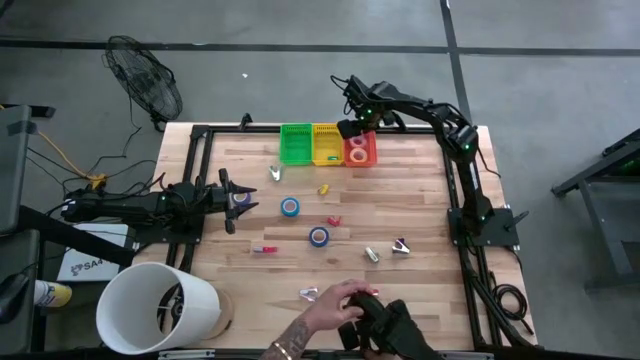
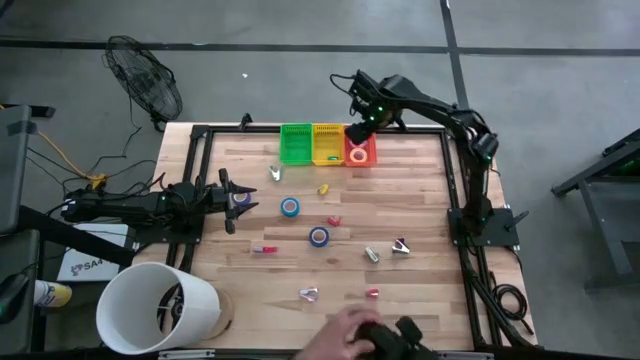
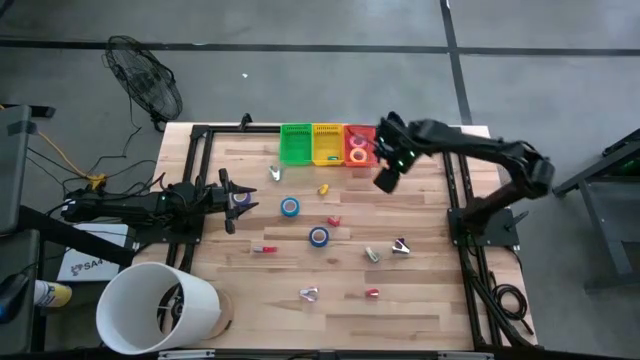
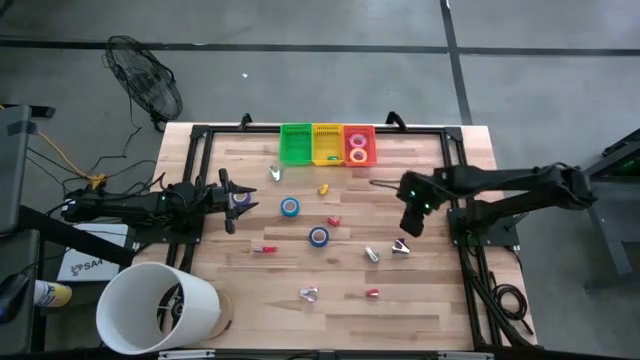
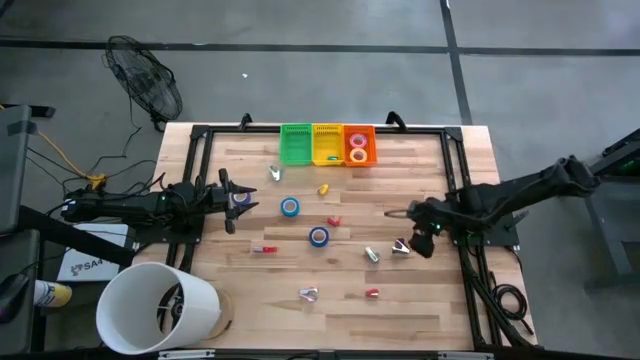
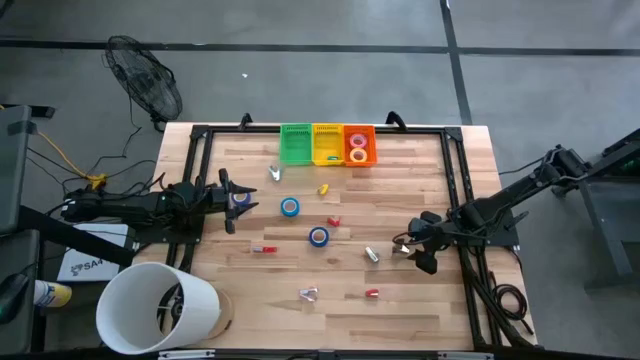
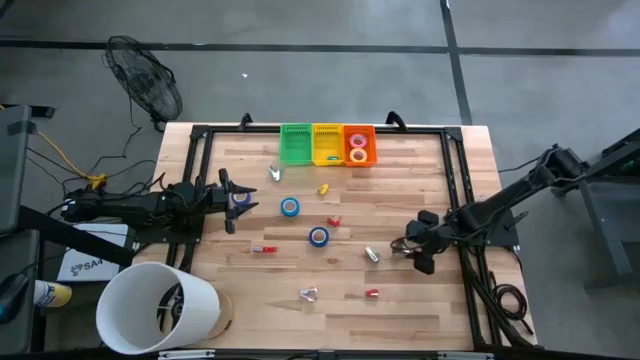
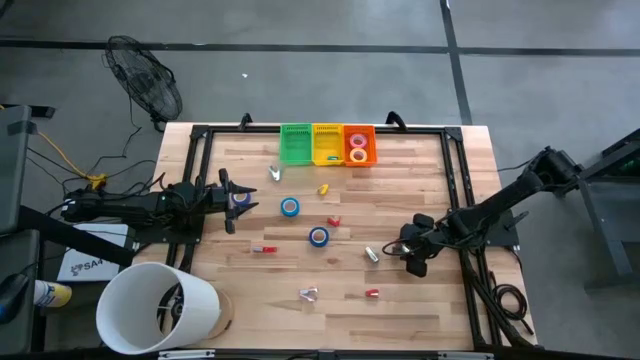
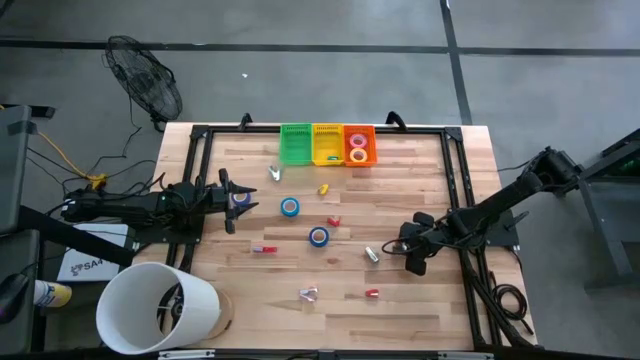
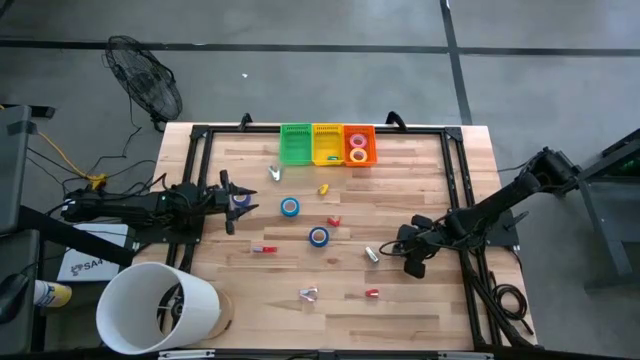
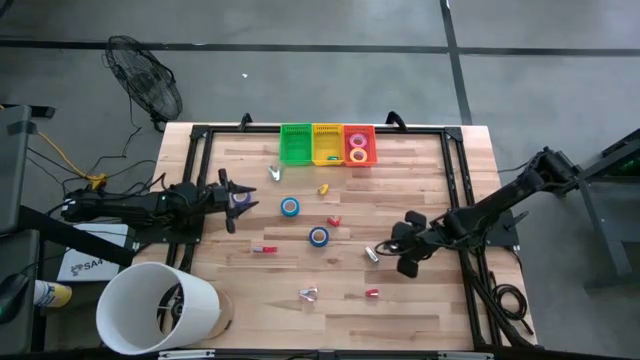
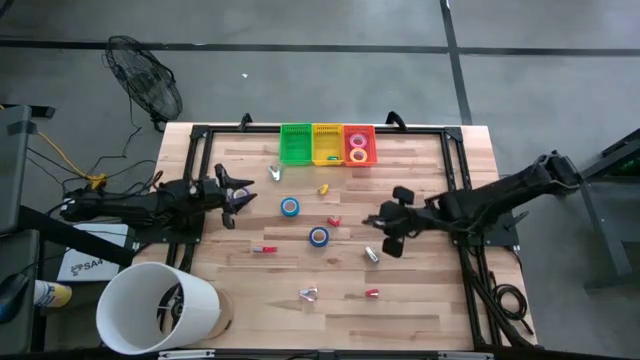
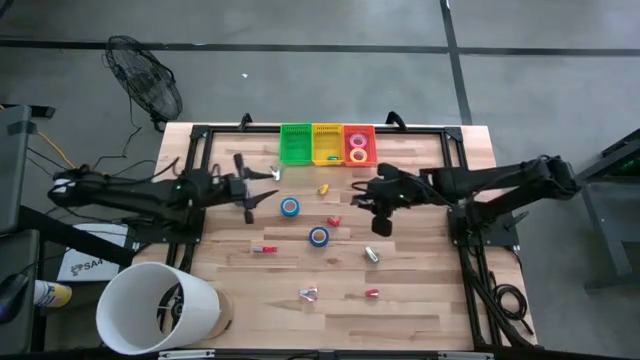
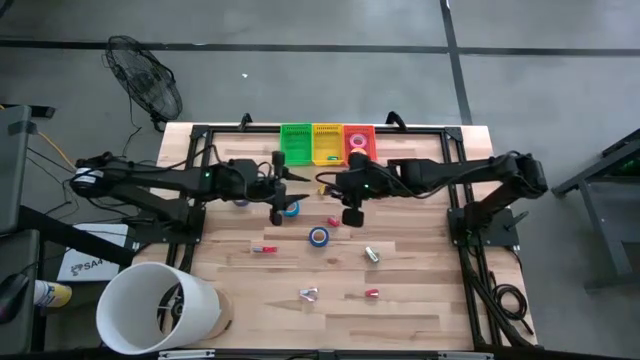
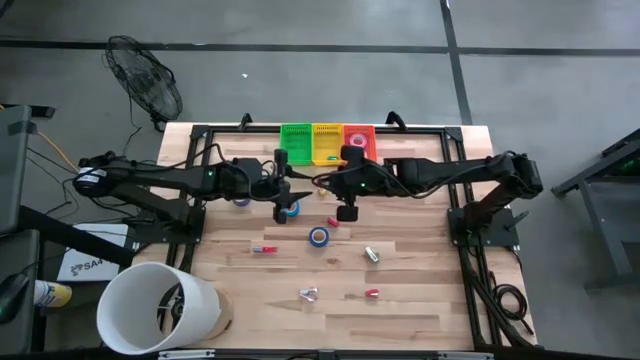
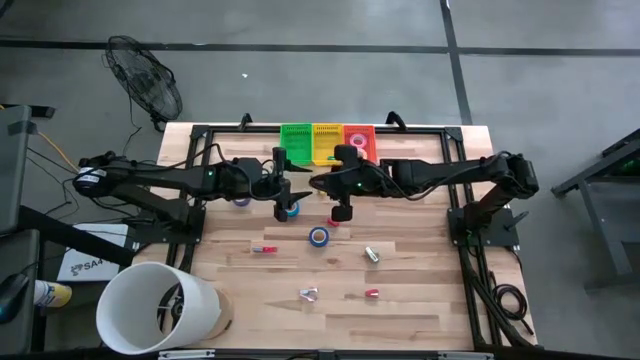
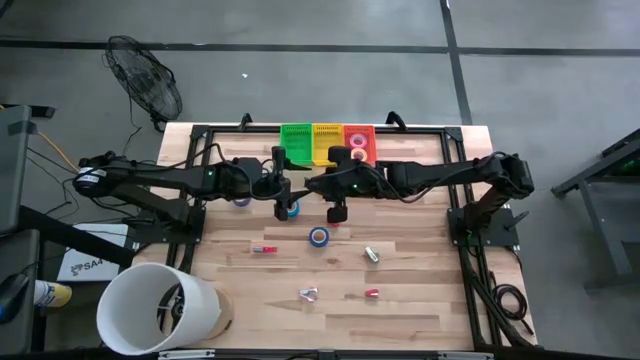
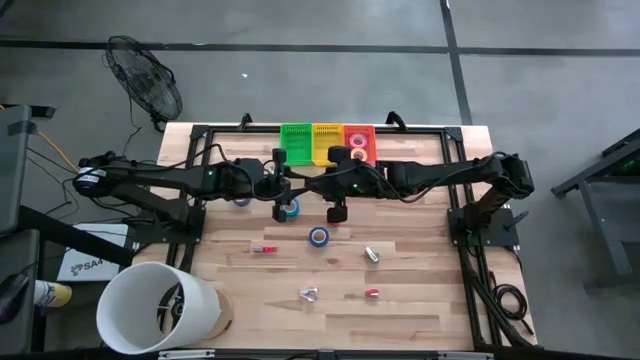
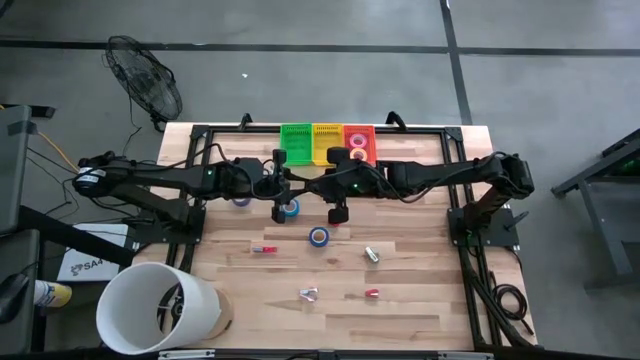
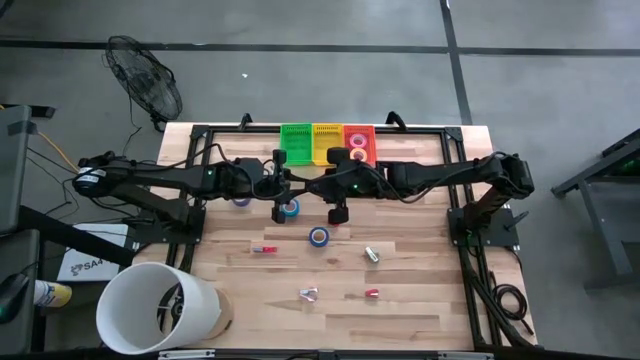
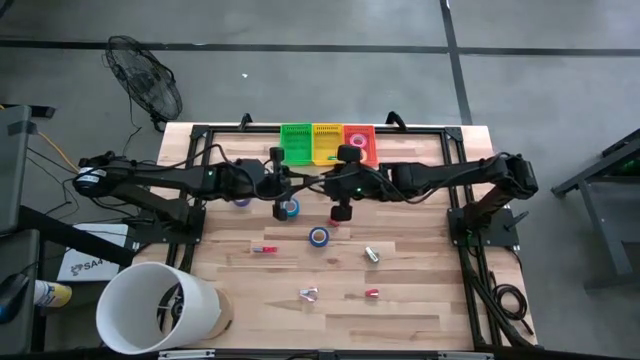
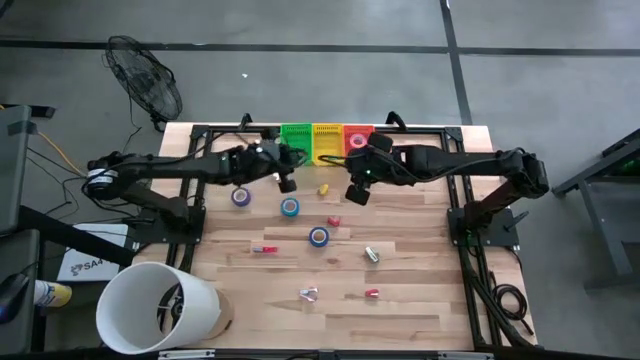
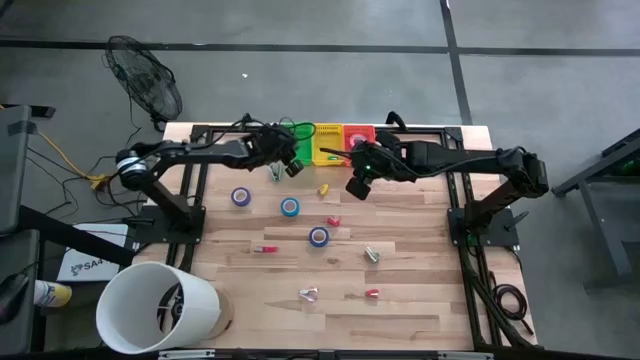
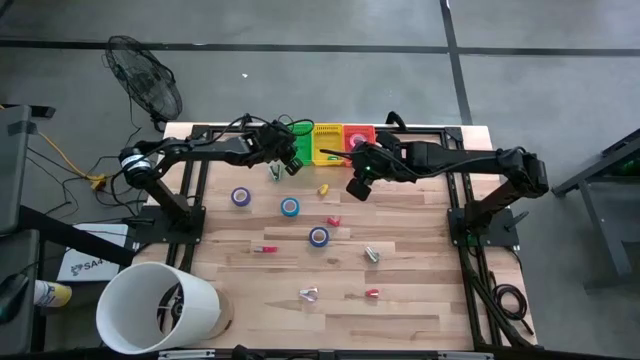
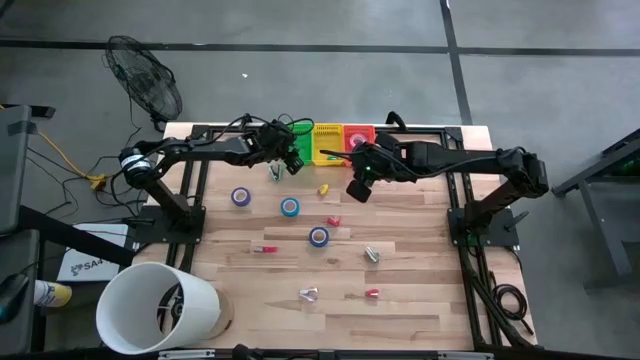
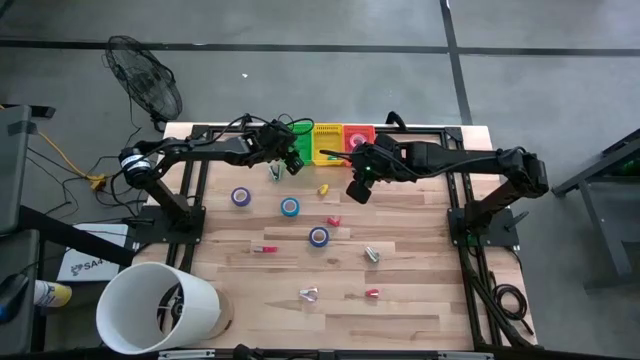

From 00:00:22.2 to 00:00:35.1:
Task: Pick and place Stapler, Stapler remover, tape
Put the dark gray staple remover into the green bin

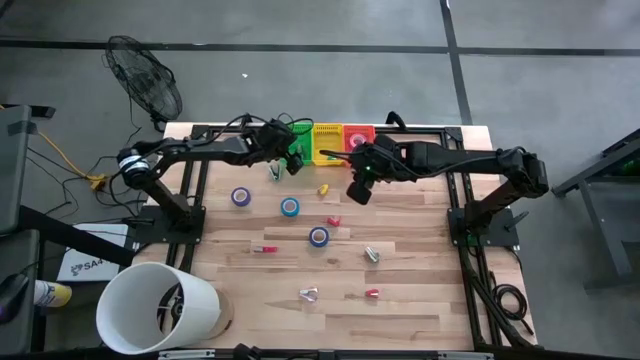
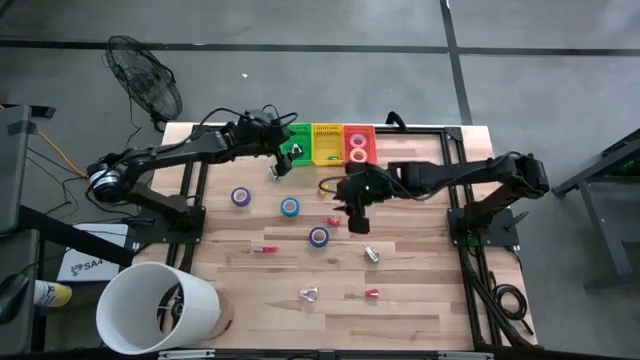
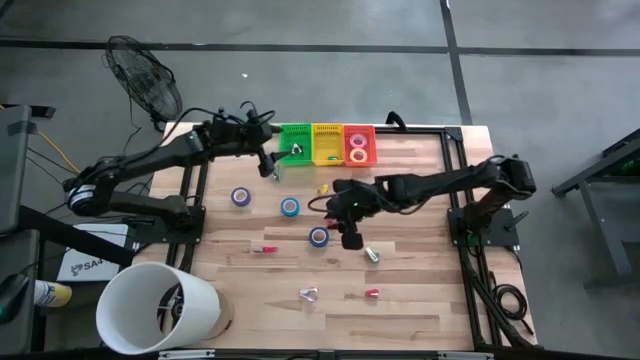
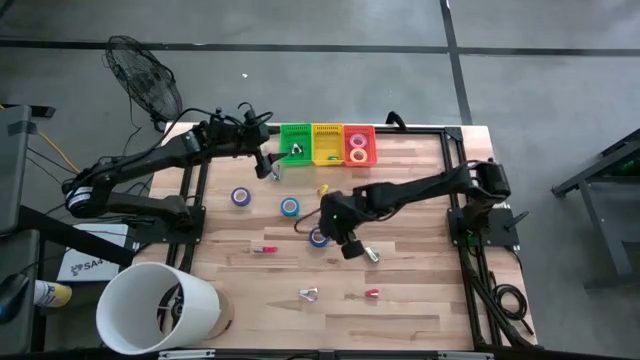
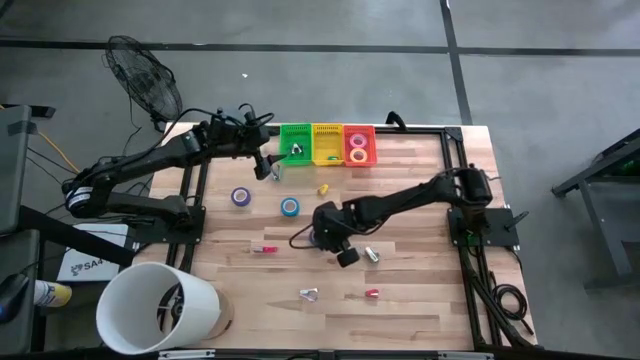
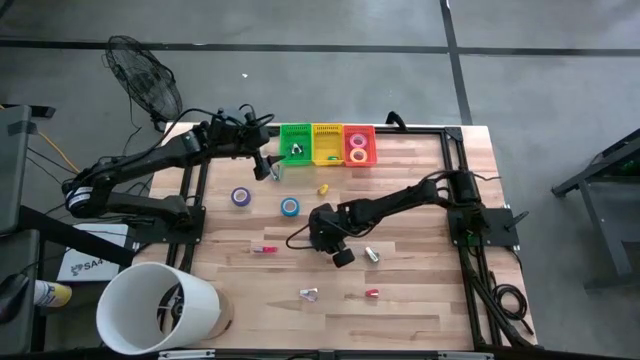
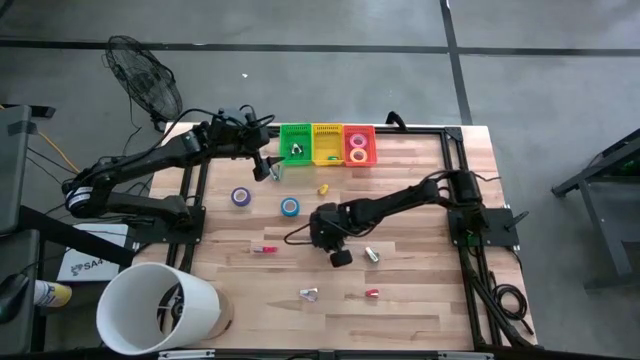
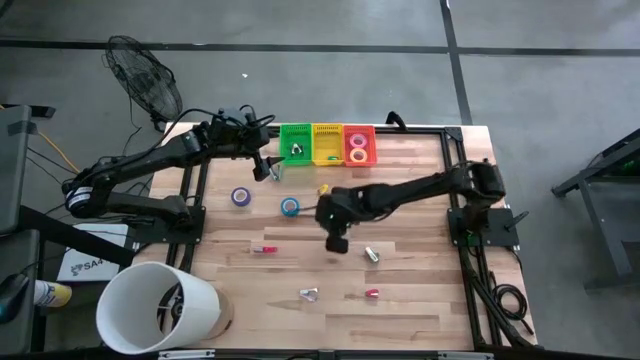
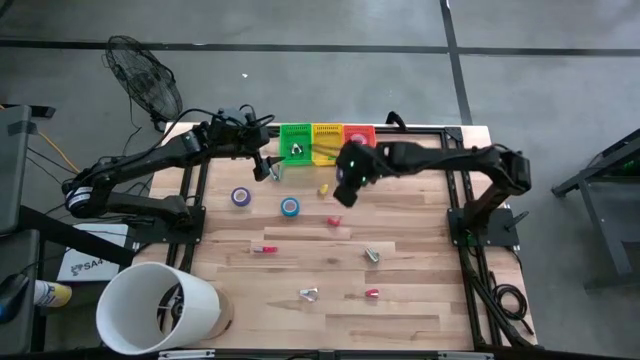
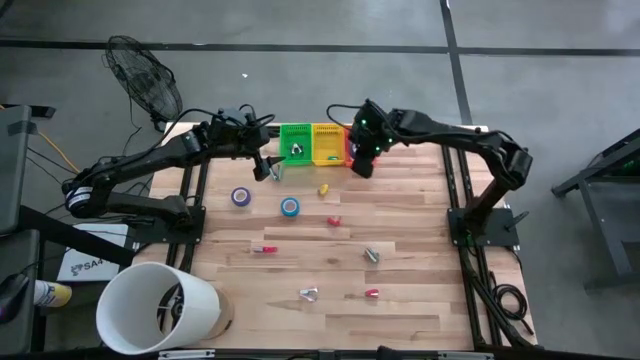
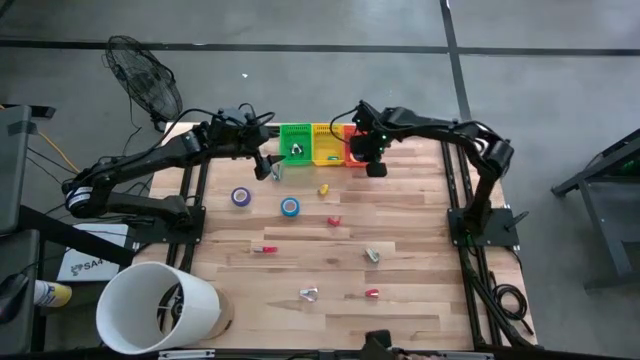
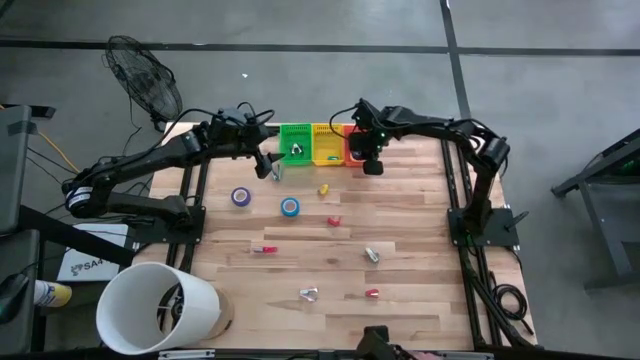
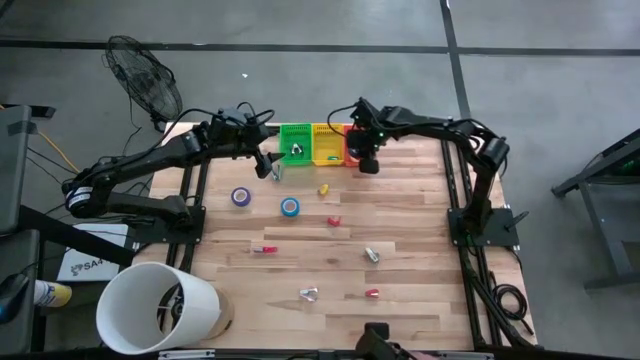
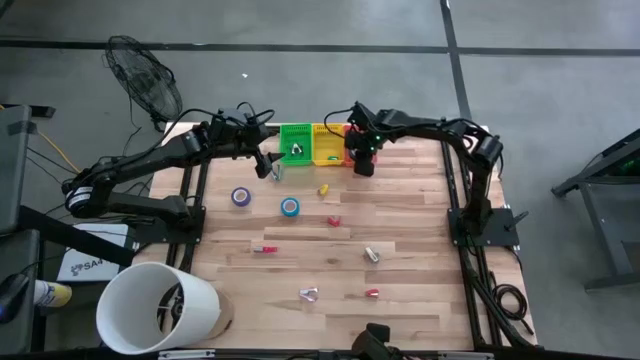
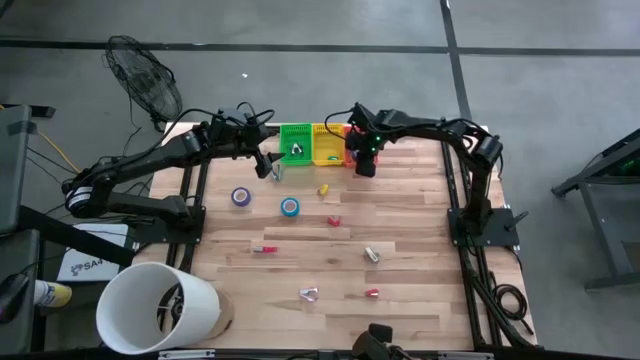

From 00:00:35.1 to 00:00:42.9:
Put the blue tape into the orange bin
